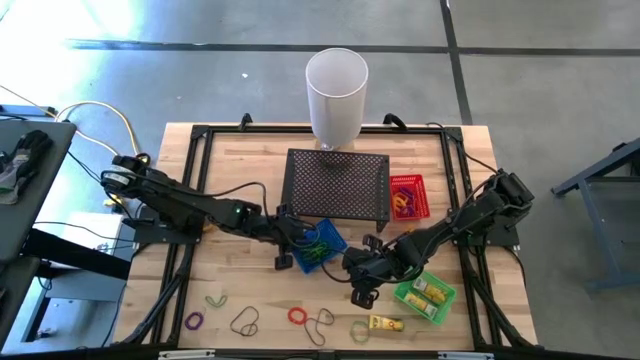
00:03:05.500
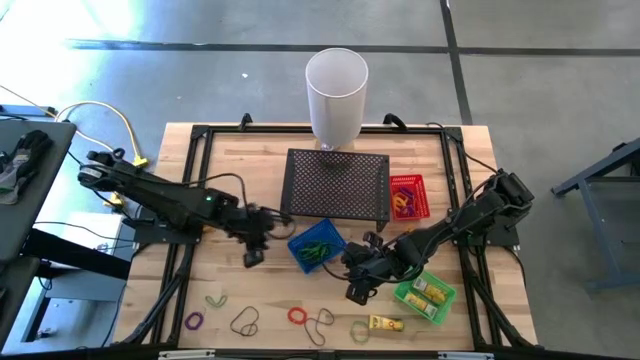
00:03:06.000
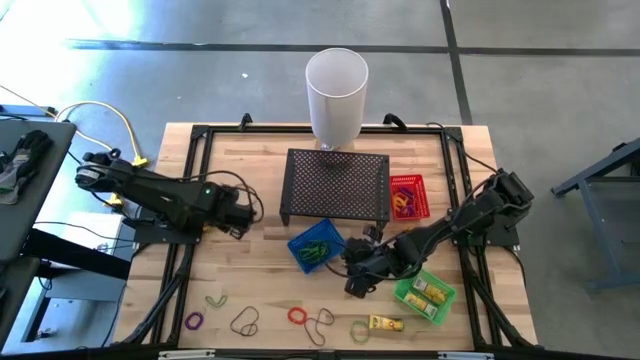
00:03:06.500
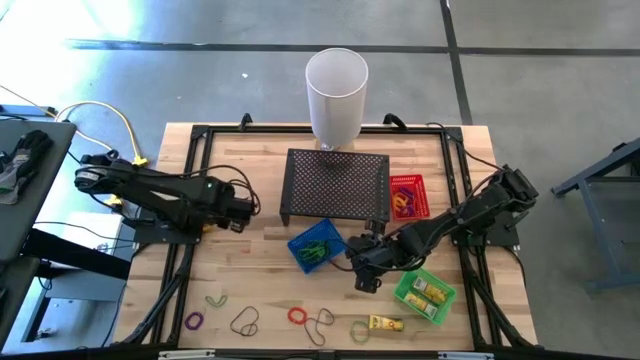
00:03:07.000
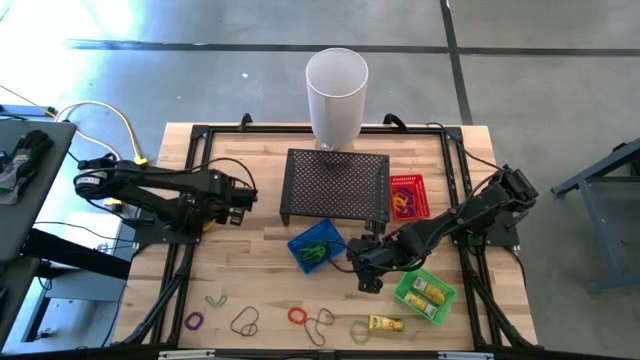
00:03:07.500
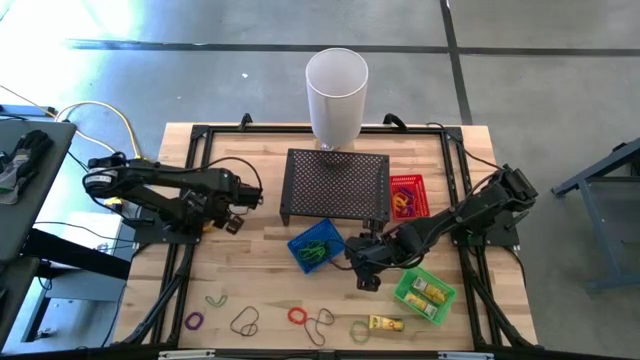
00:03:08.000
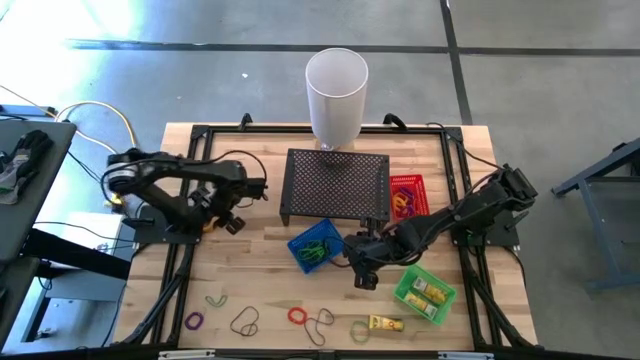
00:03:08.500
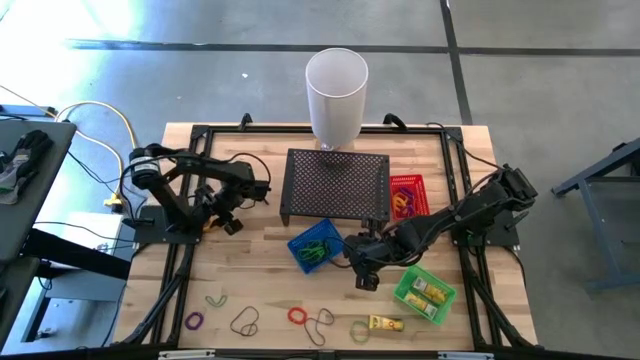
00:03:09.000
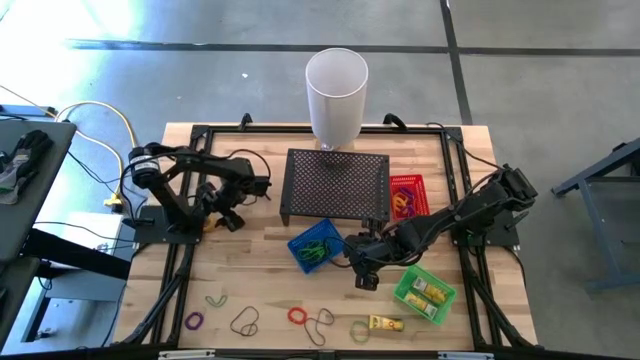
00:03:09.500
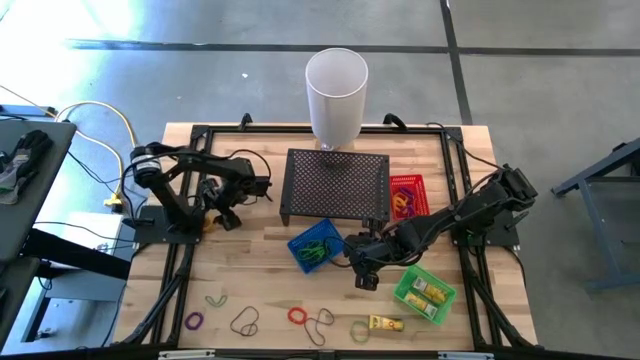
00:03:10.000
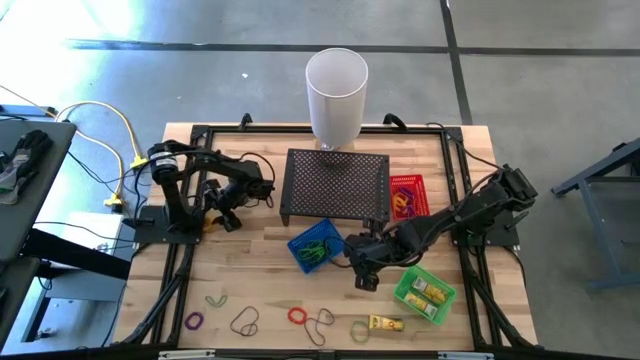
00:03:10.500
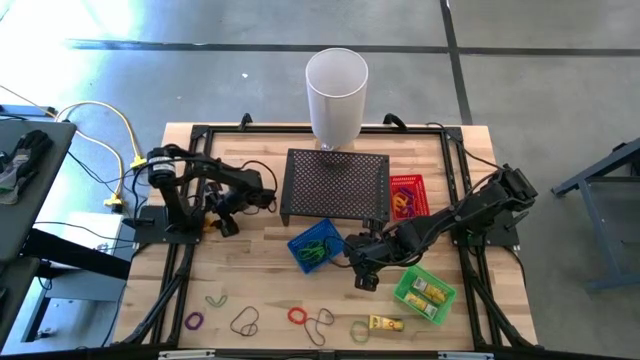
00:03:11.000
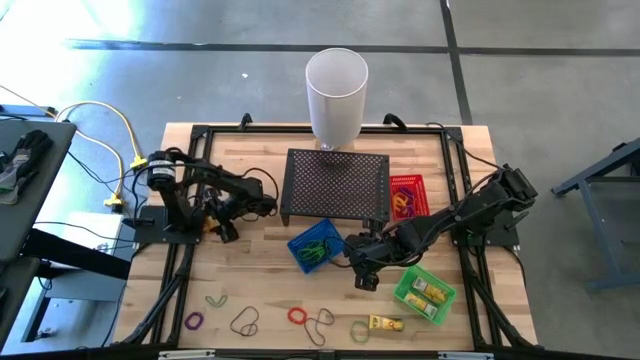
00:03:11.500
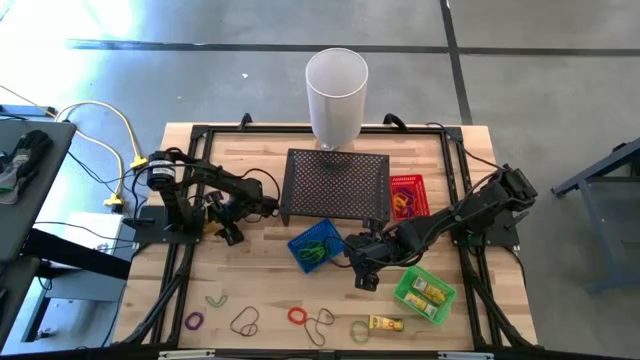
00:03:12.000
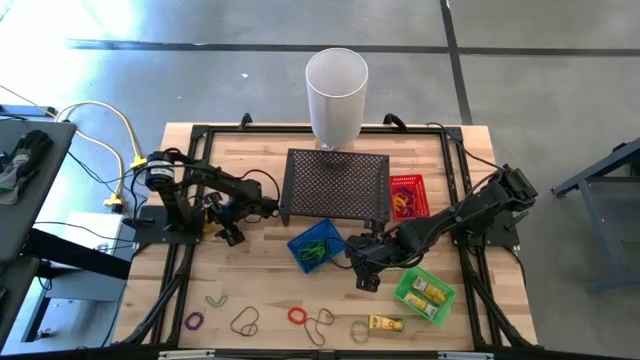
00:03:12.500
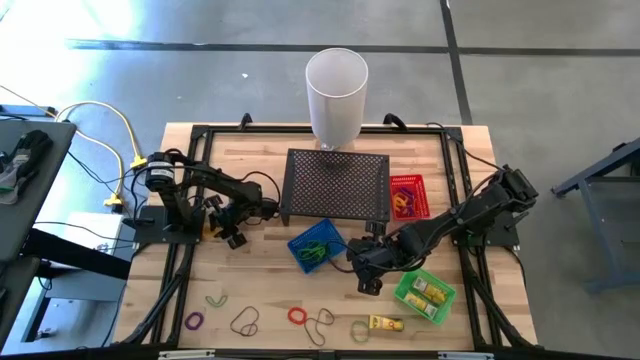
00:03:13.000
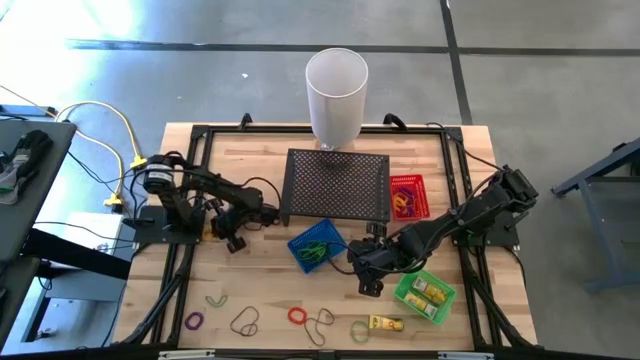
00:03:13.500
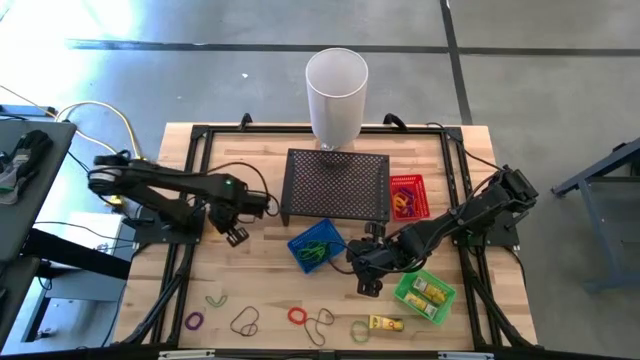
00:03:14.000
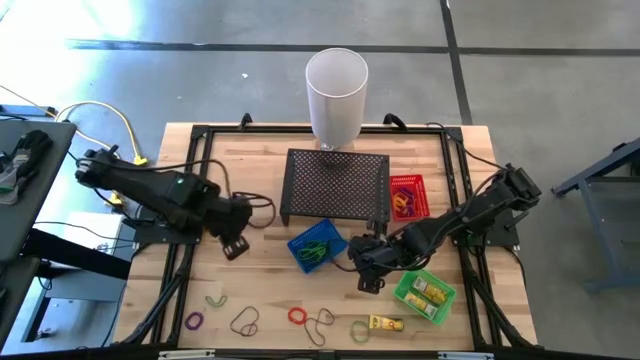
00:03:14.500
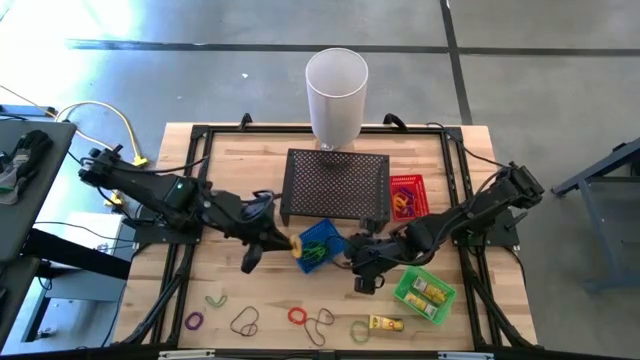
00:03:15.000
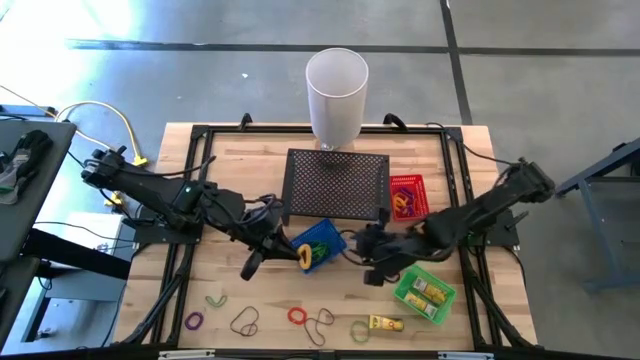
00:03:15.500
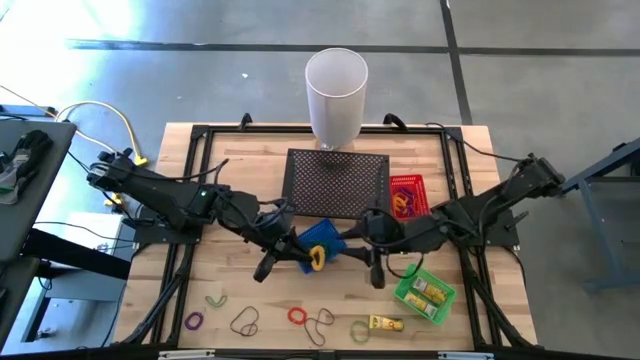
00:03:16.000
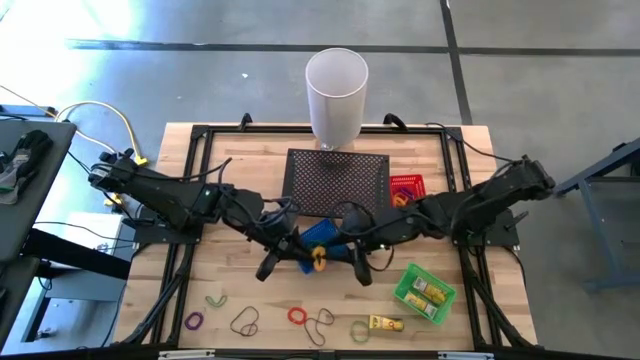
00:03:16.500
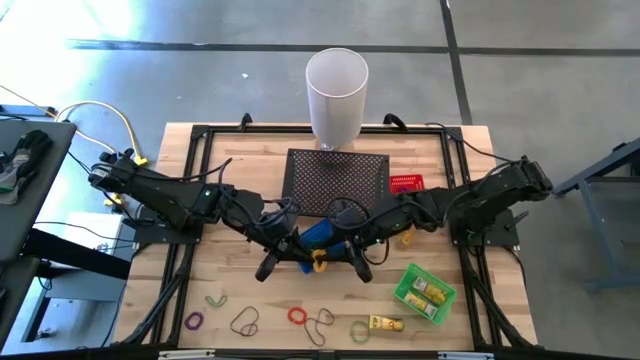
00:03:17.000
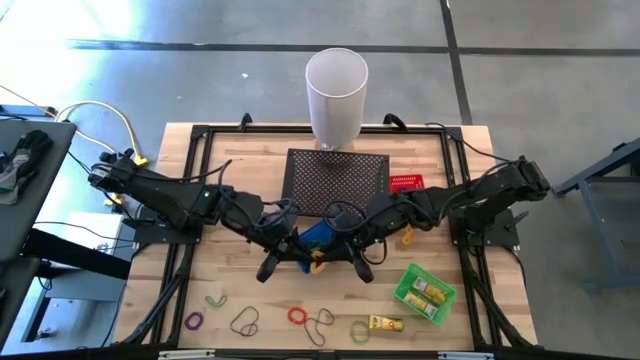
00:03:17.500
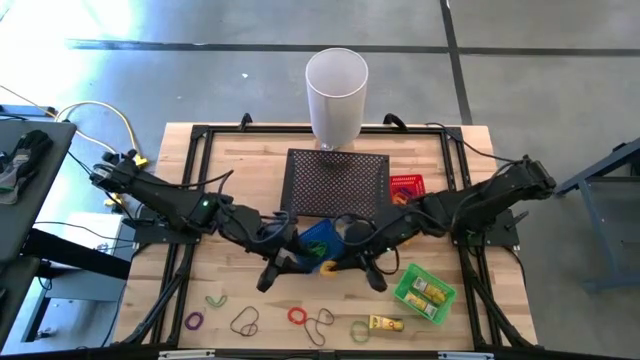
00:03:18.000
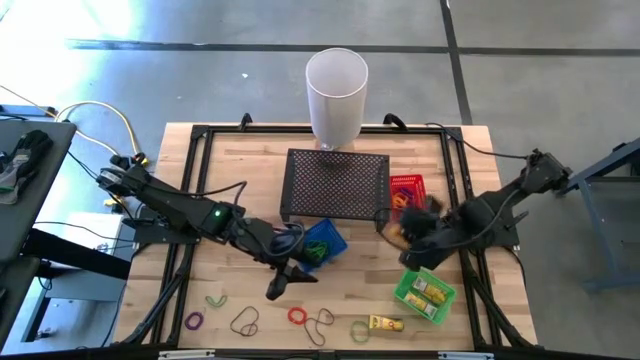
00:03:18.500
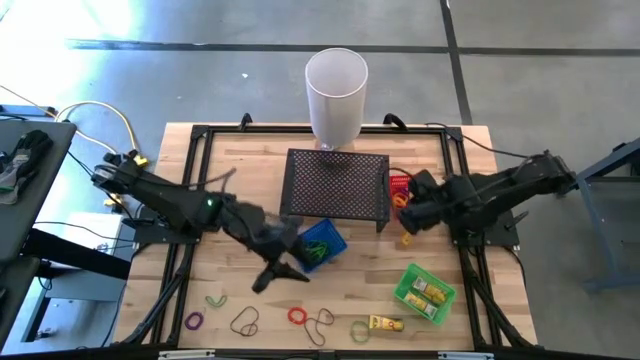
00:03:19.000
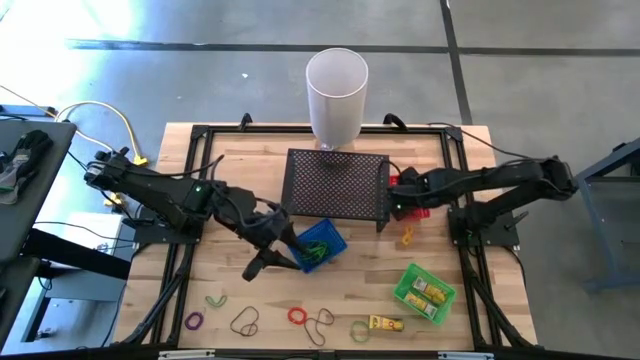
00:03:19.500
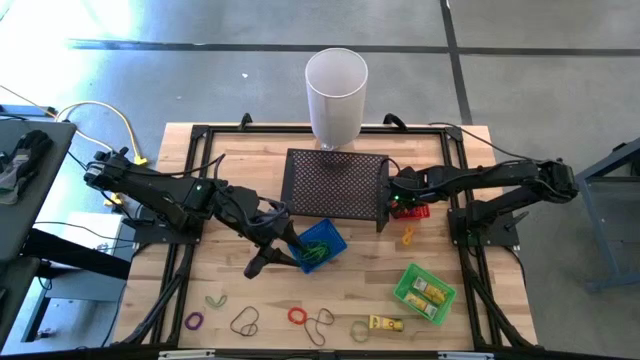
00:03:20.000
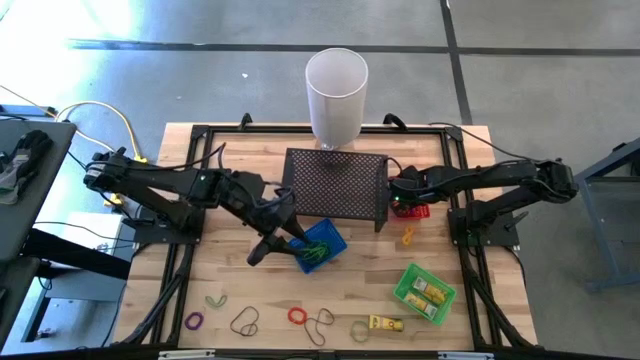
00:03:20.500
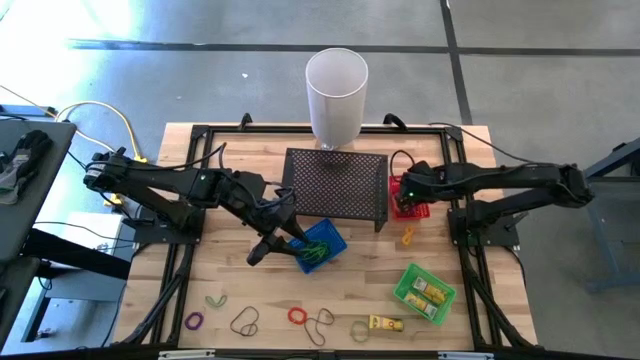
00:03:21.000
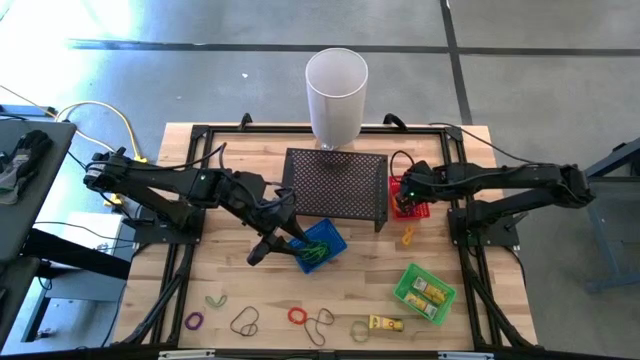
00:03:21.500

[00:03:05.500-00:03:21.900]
Task: Pick & Place Office Desk Supplies
Put the yellow spring keychain into the red bin

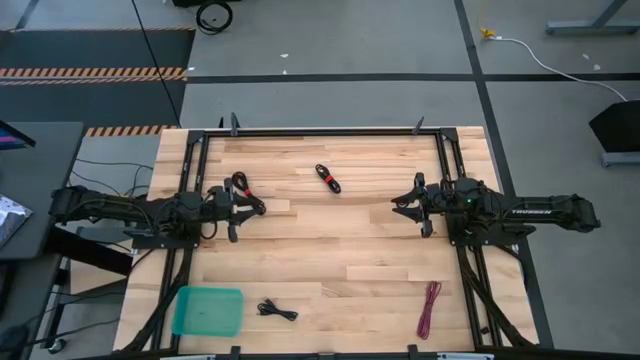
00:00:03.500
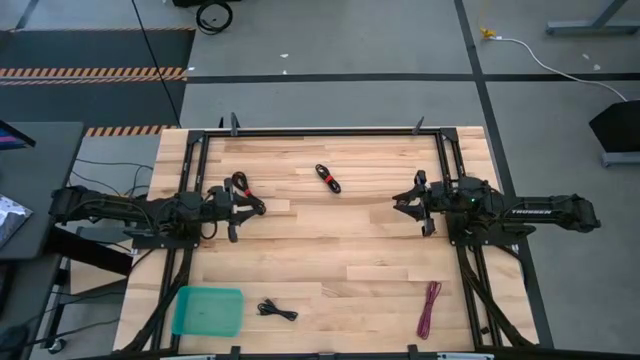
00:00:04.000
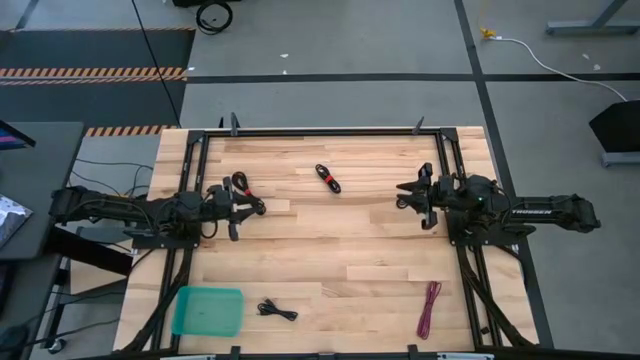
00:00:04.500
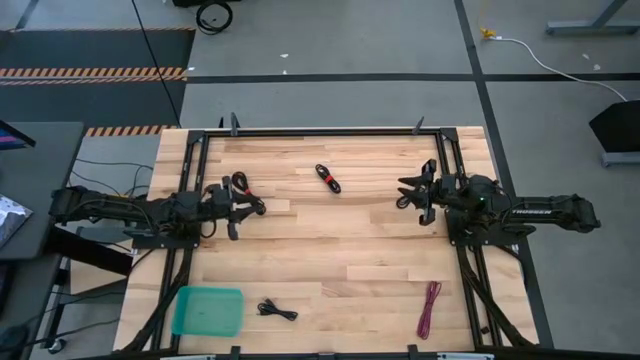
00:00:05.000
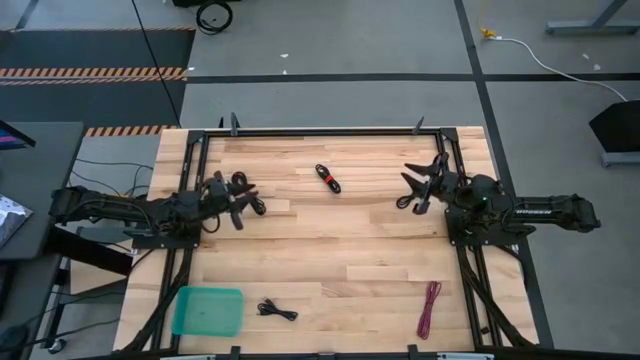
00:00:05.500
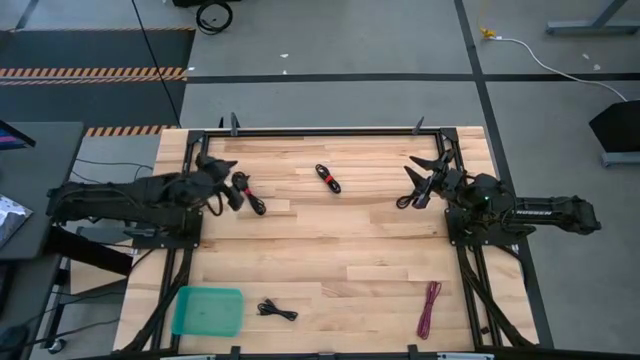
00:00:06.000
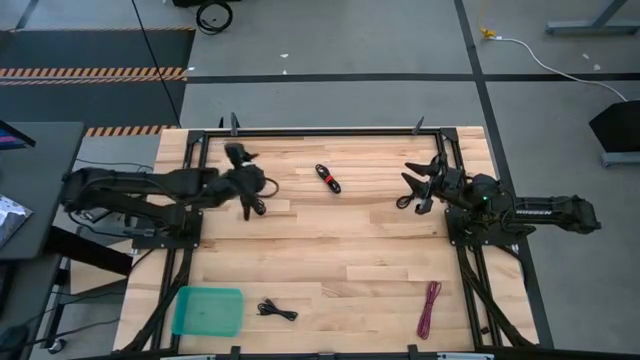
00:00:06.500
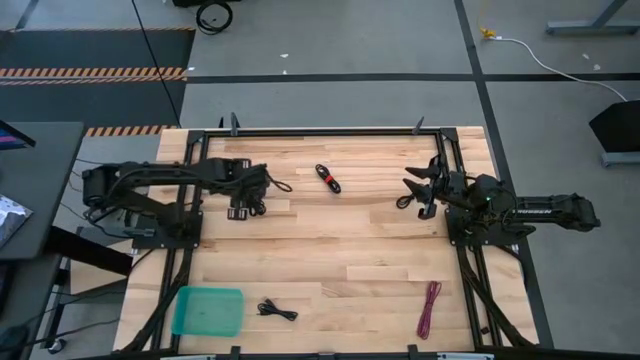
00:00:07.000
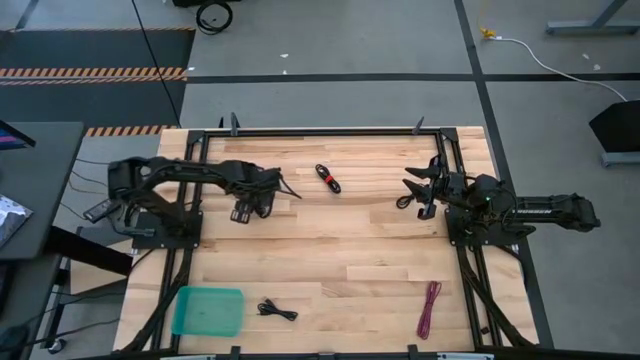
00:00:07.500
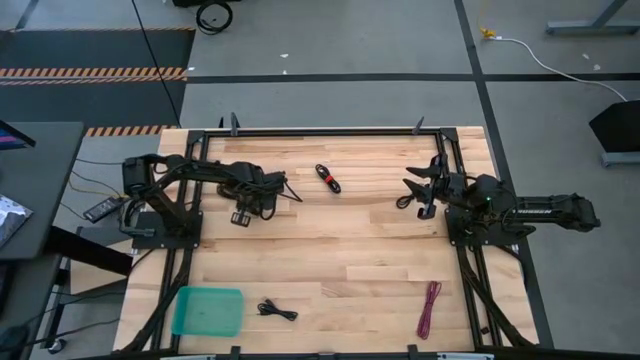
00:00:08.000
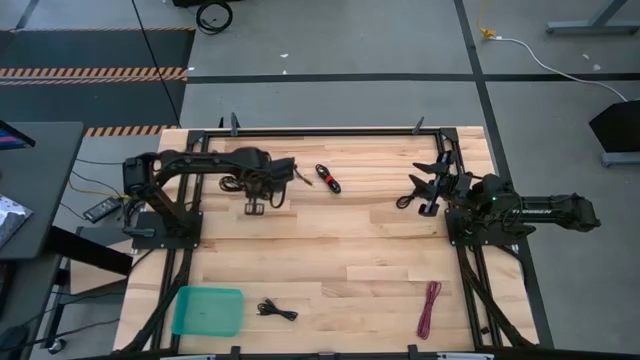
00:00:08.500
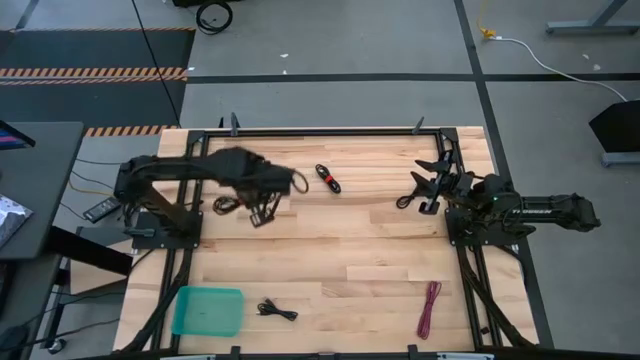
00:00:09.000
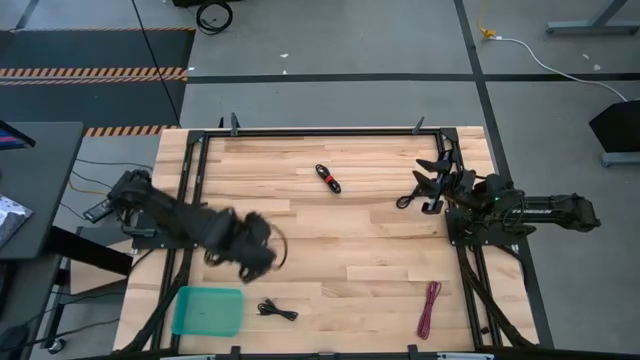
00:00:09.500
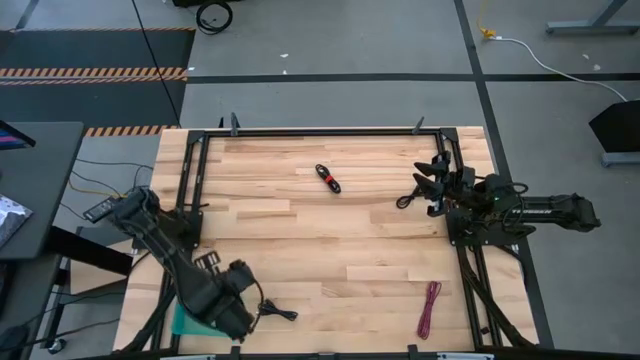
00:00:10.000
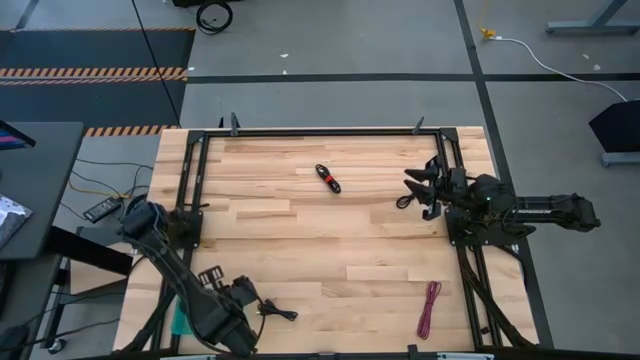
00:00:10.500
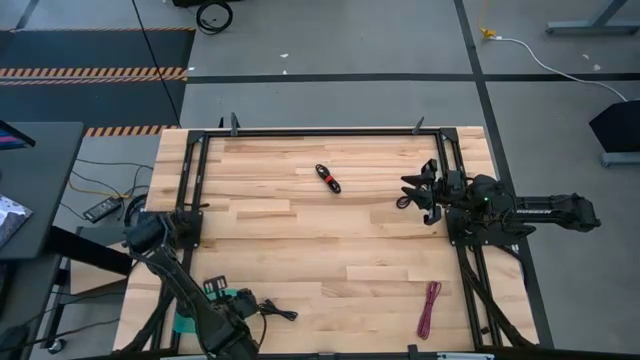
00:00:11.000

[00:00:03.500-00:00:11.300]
Task: Pick and place USB-C Cables
Put the black charger cable into the green bin
